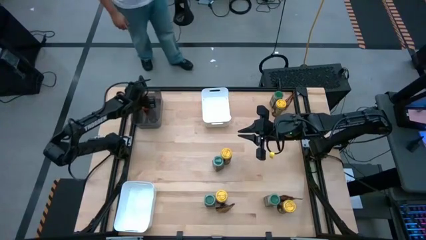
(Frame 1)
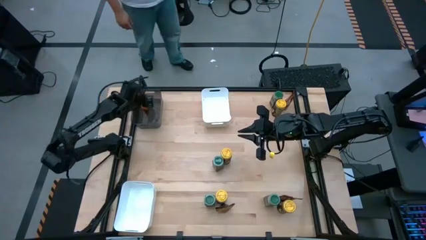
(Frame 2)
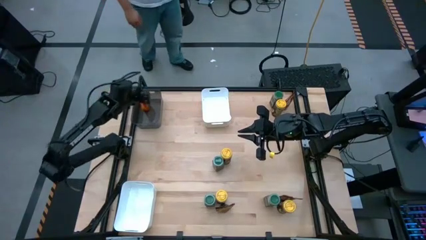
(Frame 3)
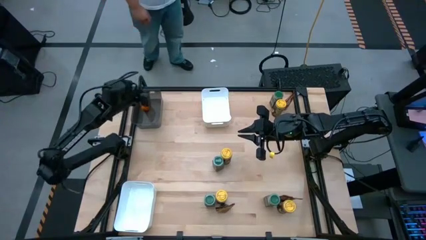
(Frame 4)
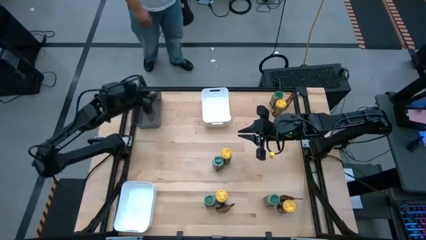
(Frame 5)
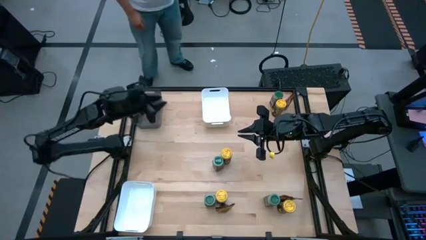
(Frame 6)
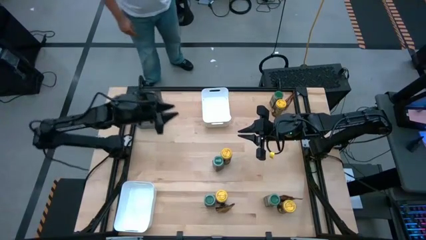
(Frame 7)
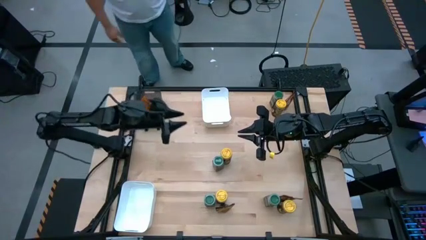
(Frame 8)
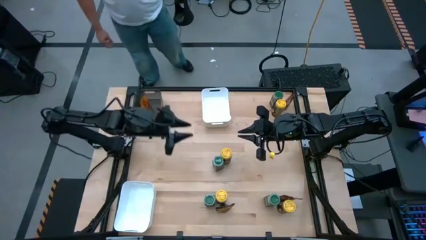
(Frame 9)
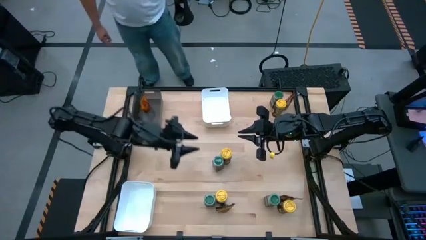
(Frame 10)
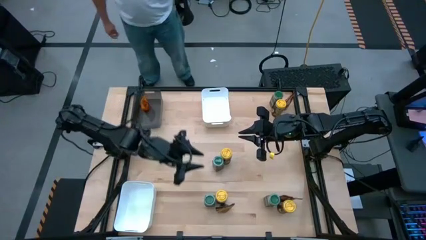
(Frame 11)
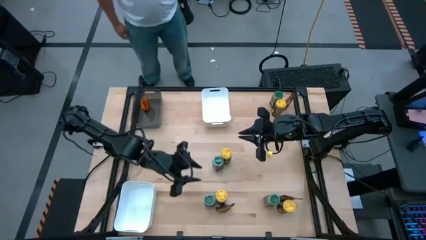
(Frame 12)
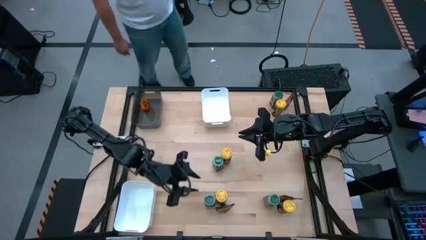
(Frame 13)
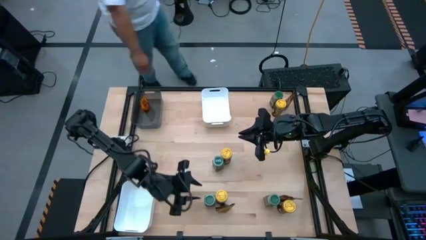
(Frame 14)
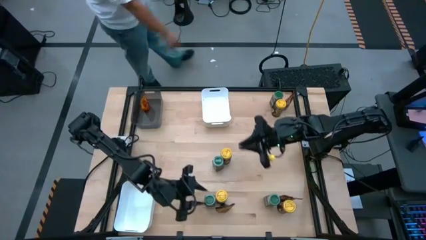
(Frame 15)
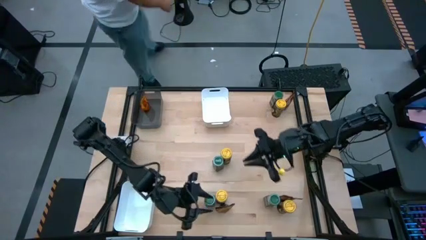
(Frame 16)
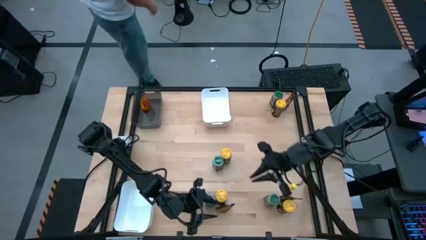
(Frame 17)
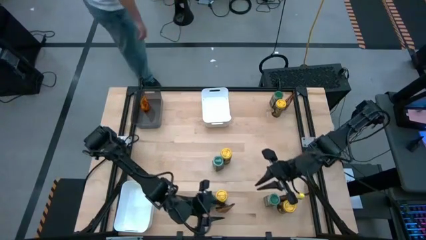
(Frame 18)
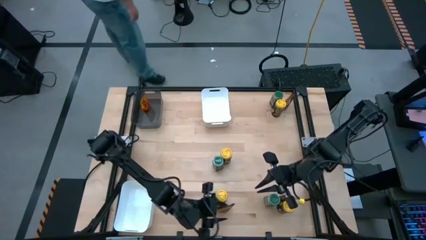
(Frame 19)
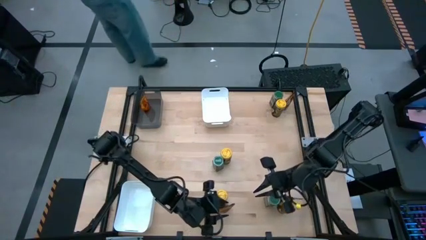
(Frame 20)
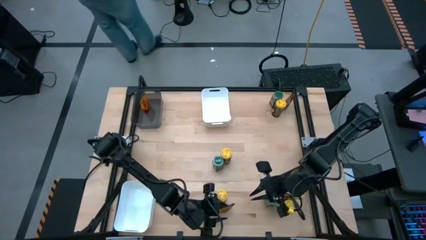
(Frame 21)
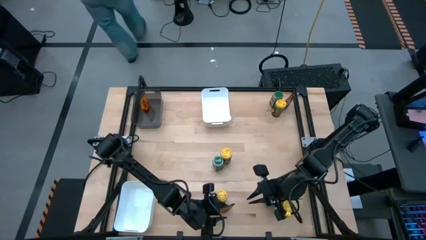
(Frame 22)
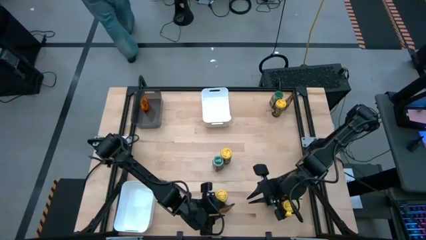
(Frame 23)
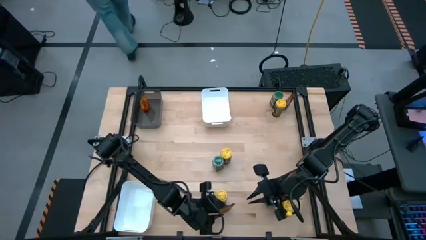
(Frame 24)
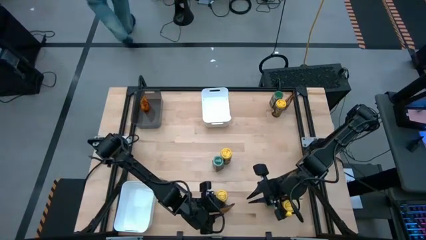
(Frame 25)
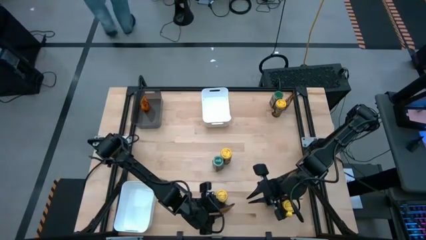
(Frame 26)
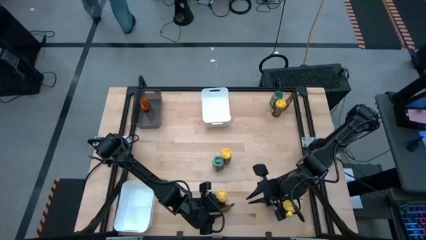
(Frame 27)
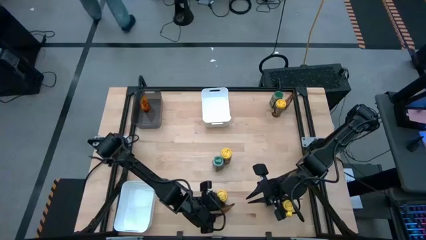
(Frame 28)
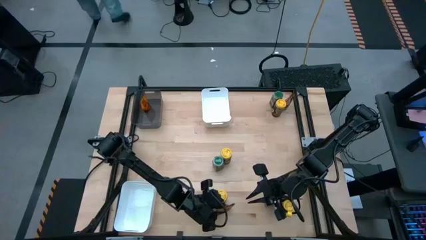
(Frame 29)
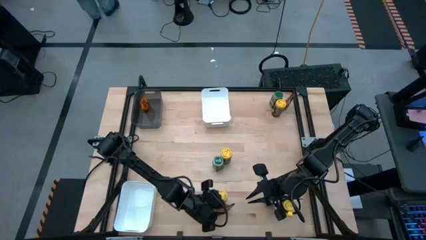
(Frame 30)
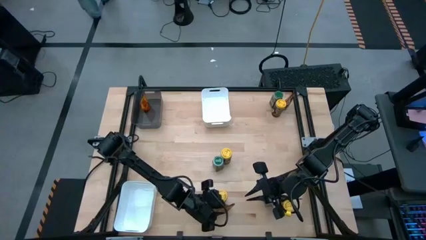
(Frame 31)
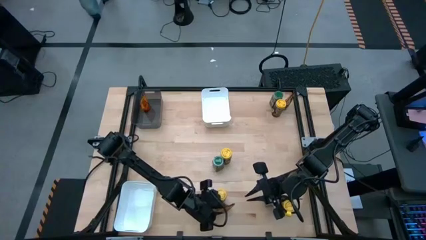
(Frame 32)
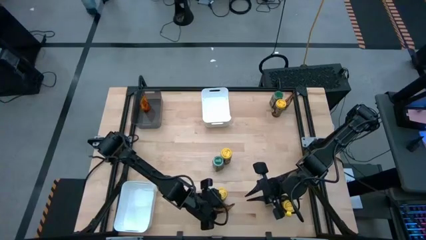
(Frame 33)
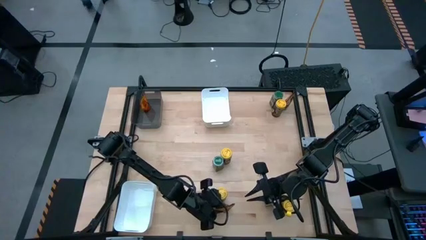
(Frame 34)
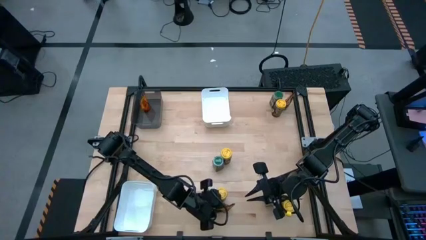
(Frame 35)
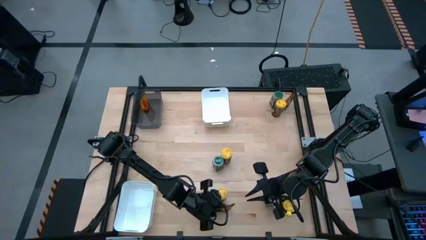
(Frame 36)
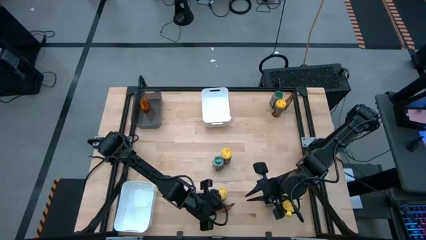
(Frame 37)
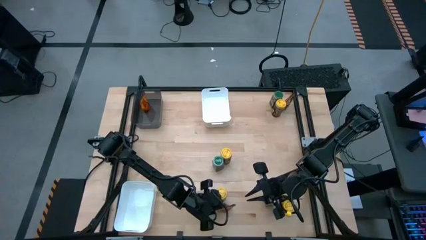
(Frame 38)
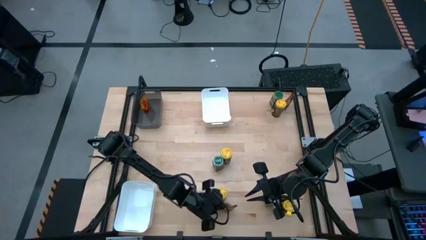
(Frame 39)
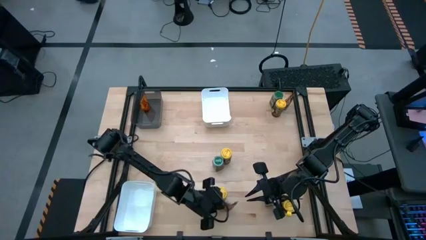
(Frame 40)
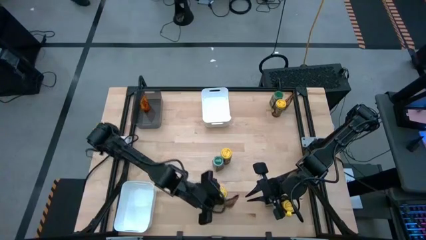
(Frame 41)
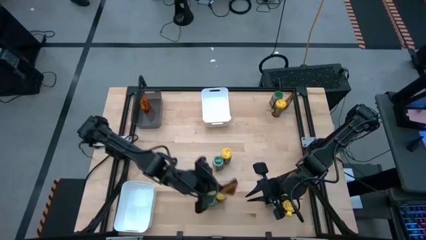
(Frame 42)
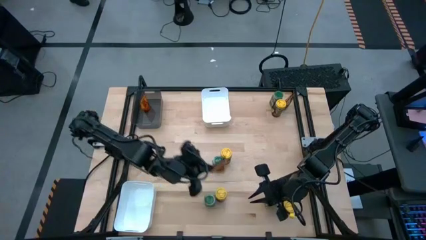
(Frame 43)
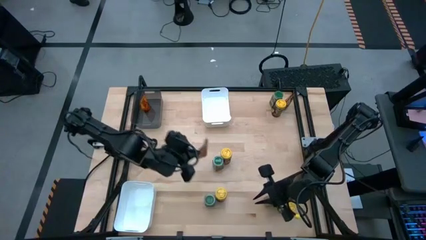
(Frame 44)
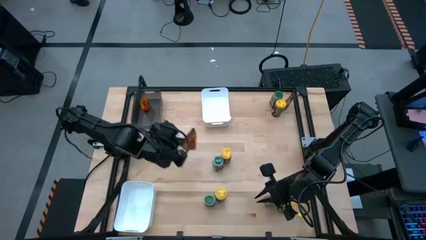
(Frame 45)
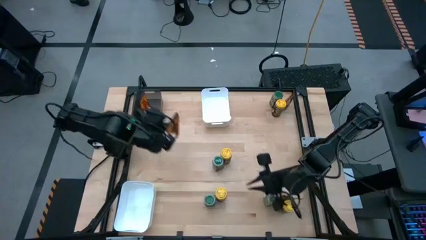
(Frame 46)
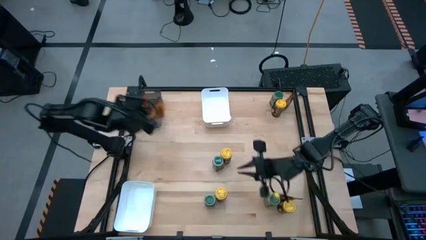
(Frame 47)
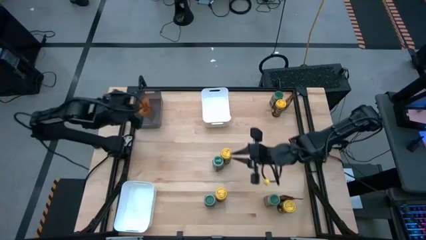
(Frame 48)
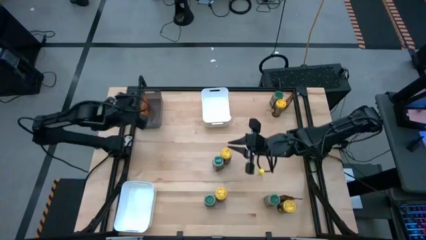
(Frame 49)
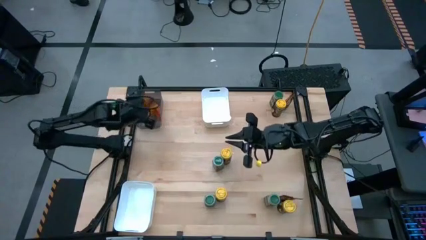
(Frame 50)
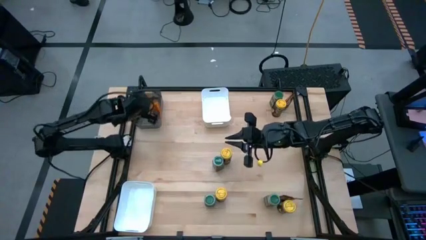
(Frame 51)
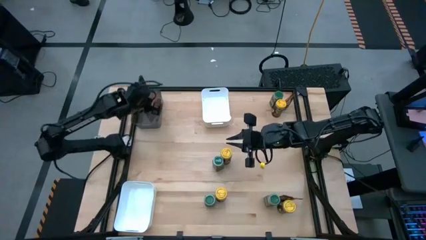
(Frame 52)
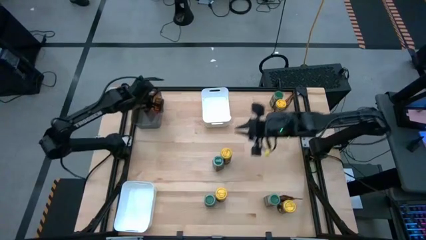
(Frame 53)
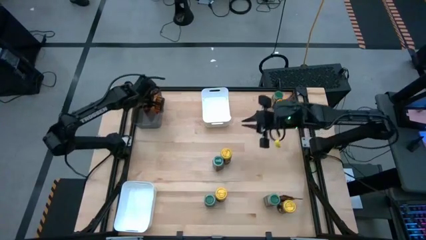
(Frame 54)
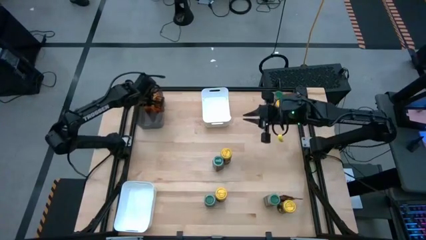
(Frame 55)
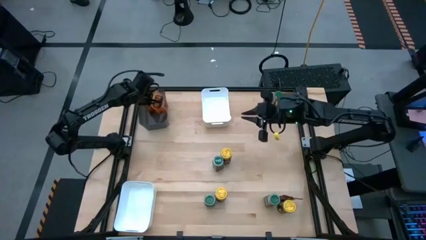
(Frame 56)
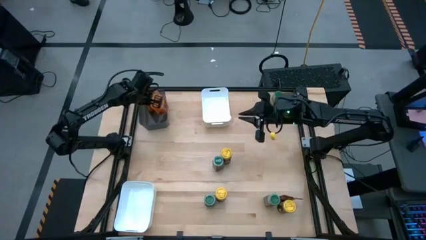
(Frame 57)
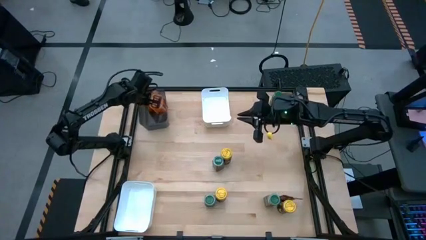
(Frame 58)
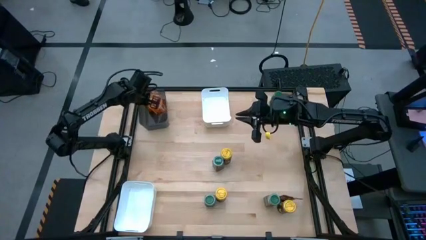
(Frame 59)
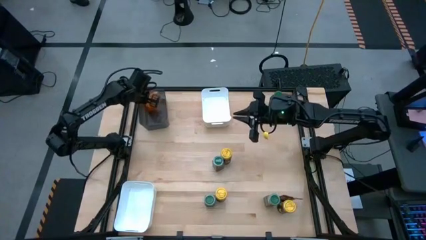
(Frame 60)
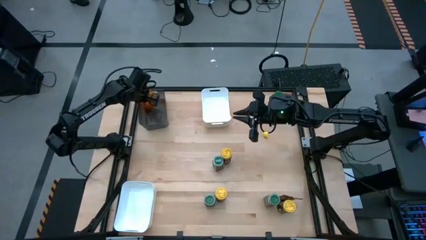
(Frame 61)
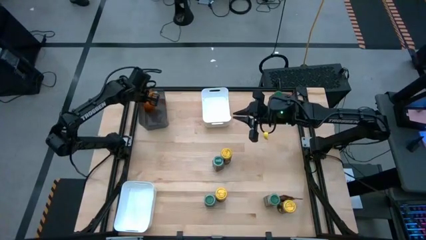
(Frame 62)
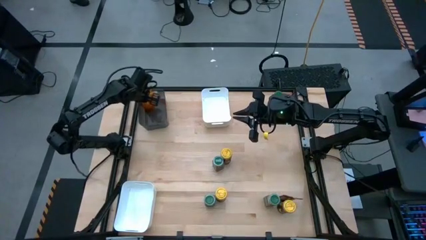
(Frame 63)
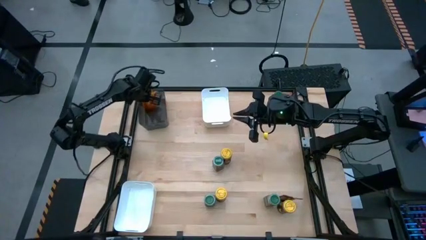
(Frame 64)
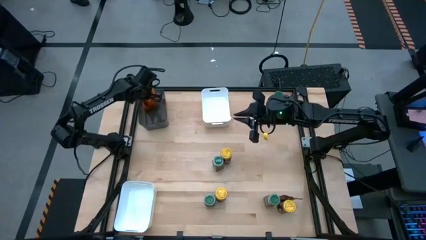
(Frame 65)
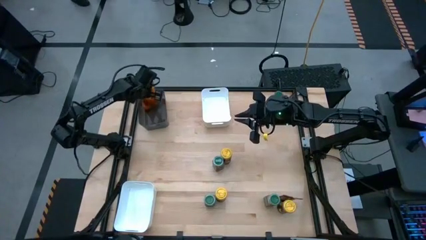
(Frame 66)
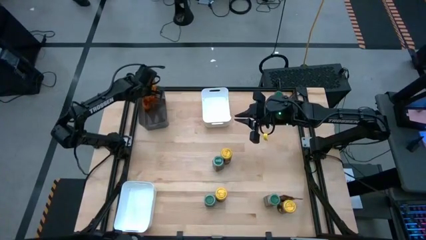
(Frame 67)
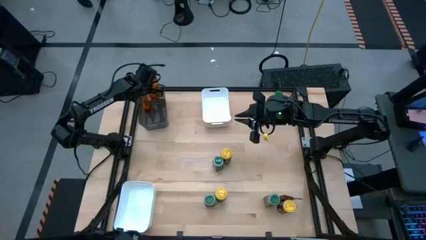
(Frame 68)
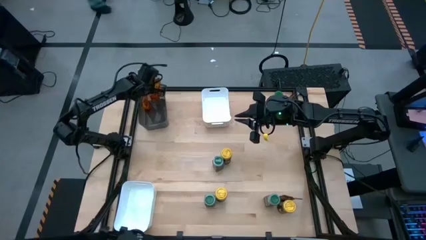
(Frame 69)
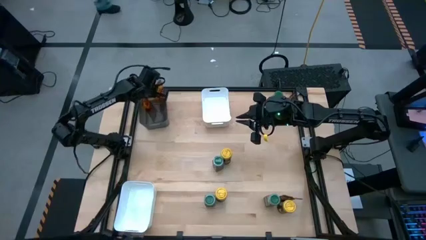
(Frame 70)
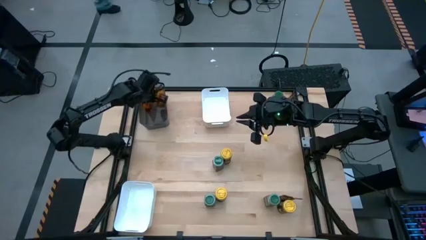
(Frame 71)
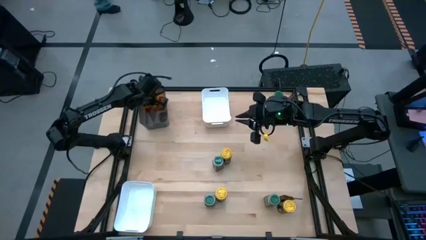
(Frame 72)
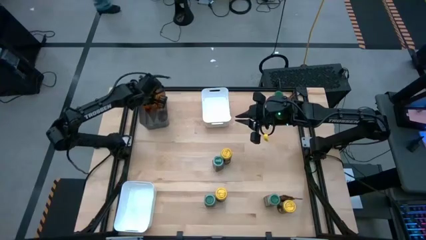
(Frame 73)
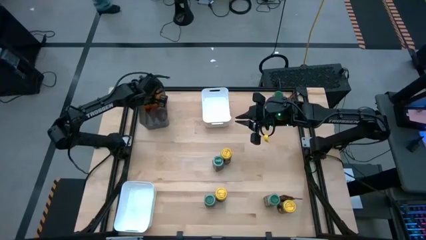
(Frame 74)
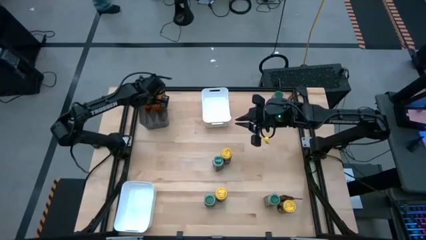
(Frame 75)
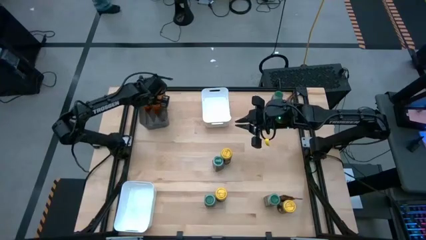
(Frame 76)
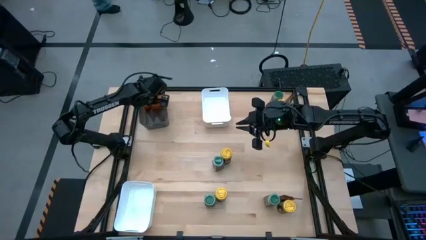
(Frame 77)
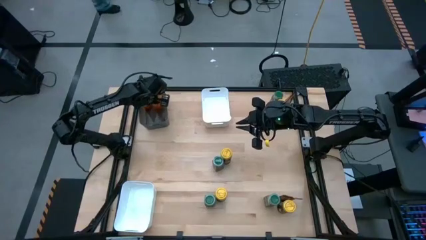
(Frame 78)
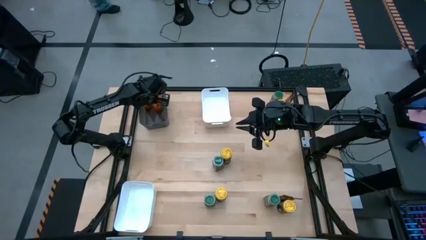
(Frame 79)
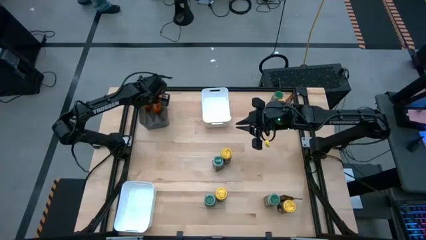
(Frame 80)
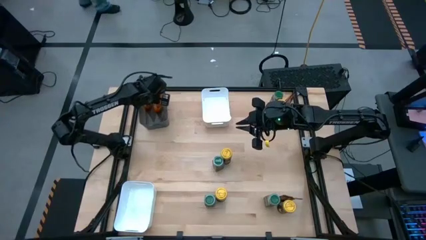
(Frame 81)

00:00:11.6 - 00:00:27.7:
Task: Sort spices by type
Put the bottom left orange seasoning pack into the black bin

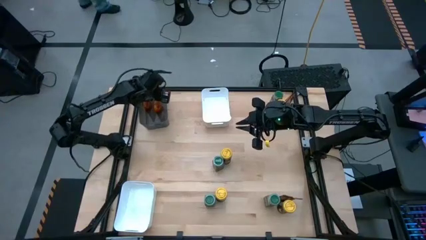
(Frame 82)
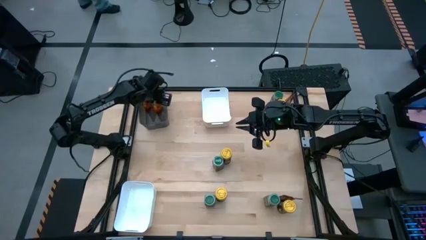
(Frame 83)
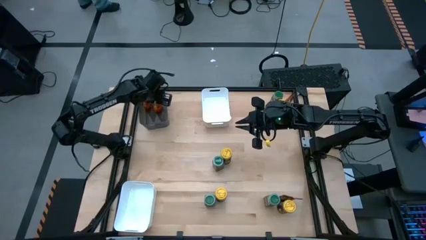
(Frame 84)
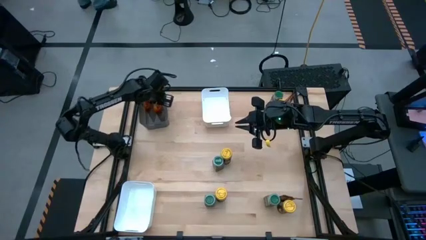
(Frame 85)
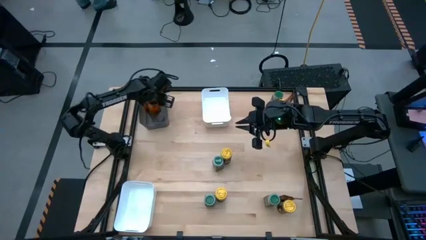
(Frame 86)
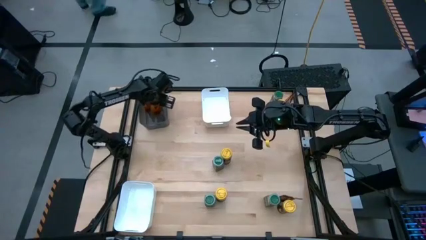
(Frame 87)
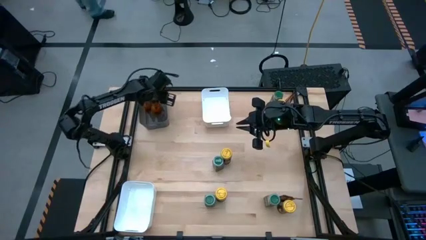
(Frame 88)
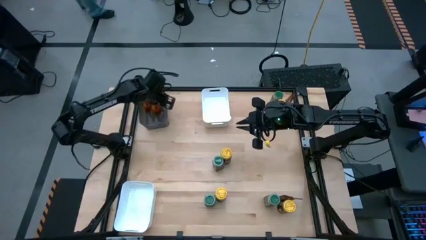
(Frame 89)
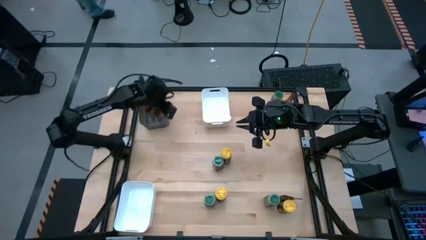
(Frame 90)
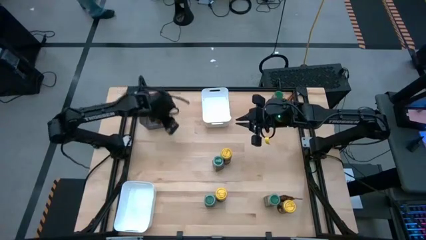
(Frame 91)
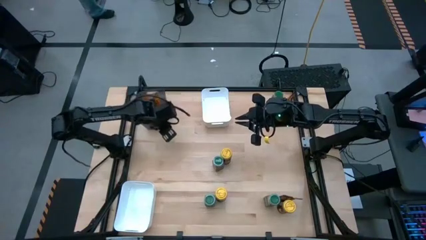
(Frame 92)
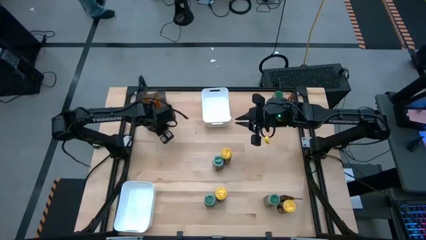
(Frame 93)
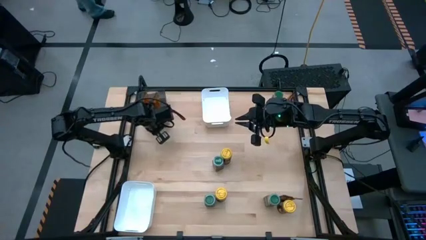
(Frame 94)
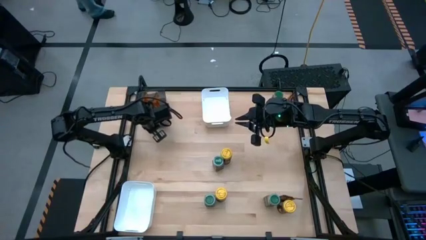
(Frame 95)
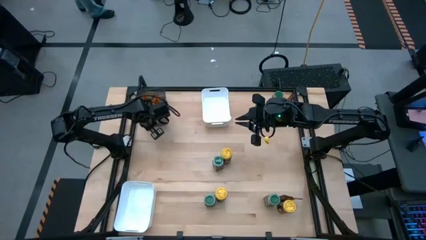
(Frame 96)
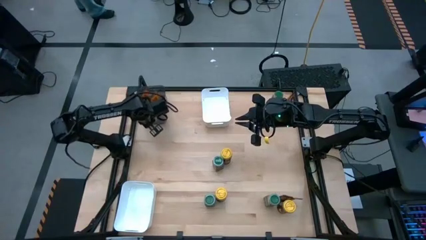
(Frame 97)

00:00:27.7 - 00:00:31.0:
Adjust the black bin
